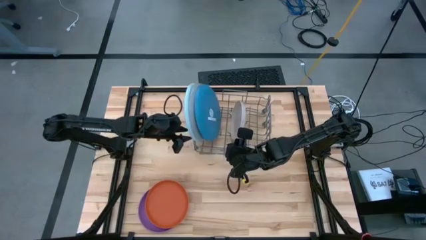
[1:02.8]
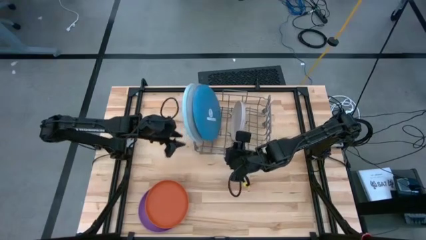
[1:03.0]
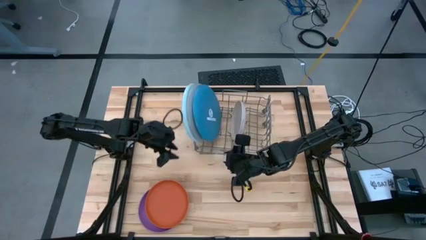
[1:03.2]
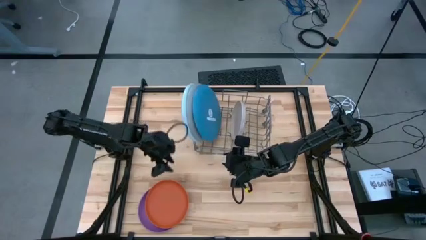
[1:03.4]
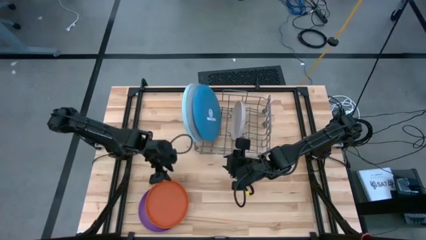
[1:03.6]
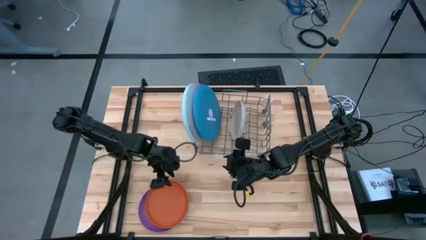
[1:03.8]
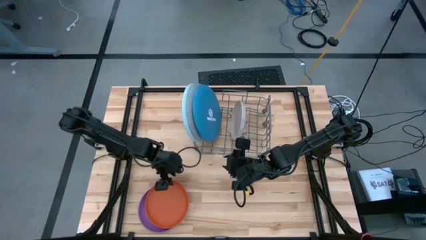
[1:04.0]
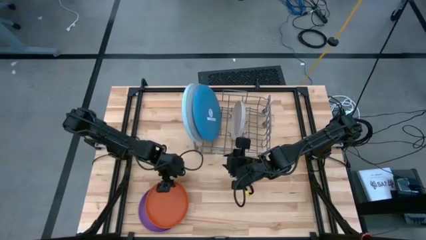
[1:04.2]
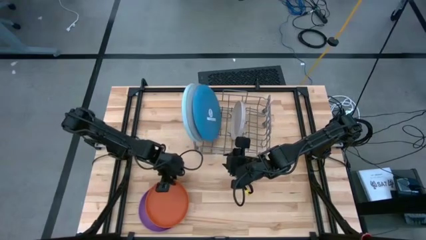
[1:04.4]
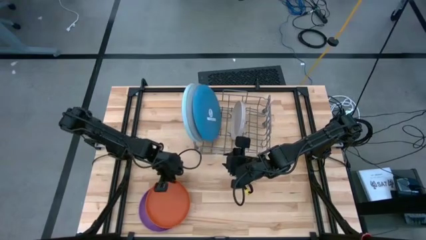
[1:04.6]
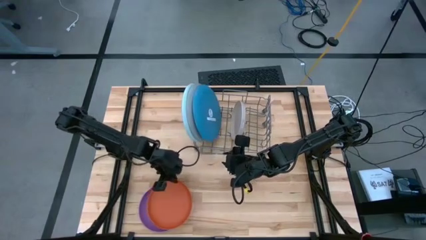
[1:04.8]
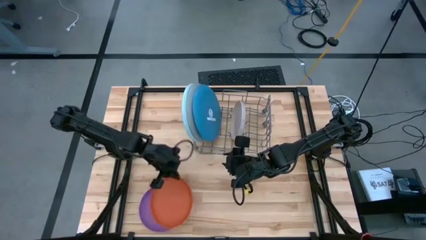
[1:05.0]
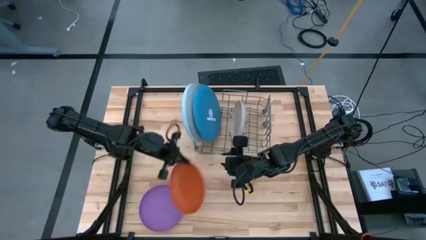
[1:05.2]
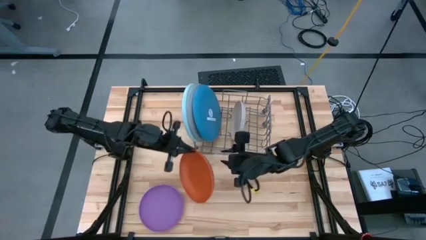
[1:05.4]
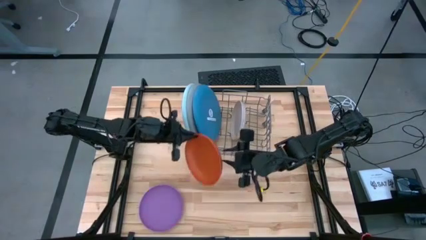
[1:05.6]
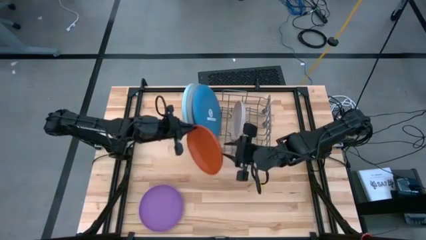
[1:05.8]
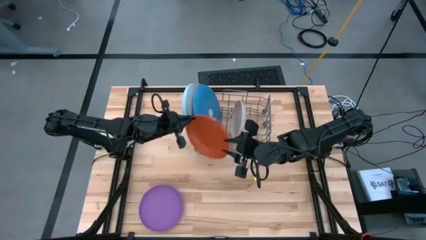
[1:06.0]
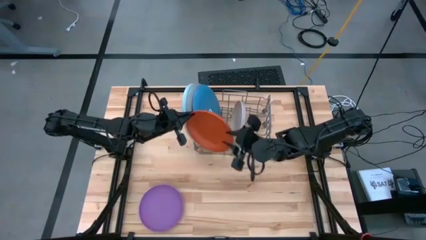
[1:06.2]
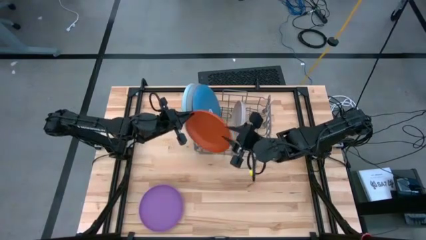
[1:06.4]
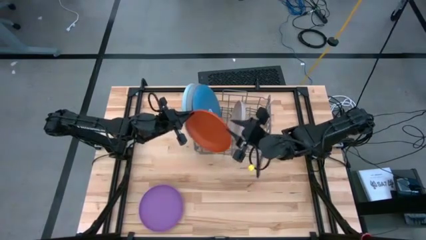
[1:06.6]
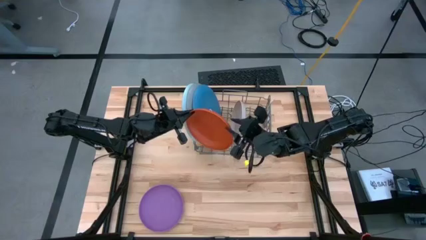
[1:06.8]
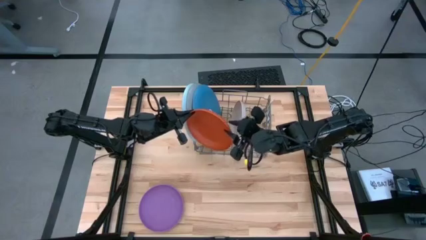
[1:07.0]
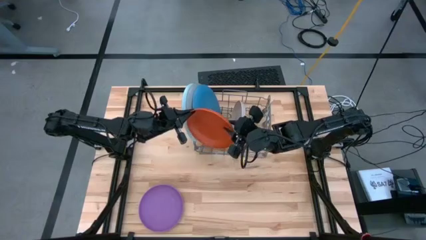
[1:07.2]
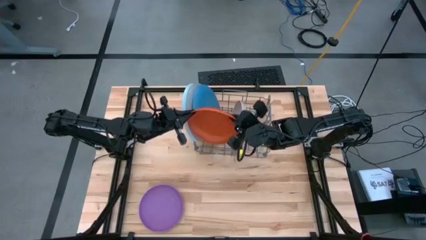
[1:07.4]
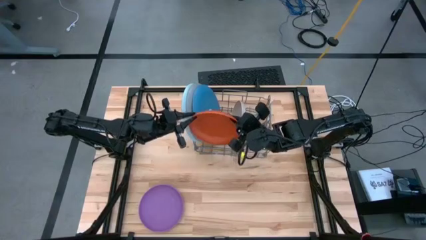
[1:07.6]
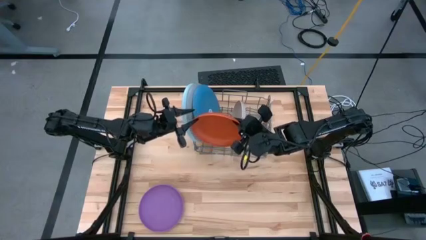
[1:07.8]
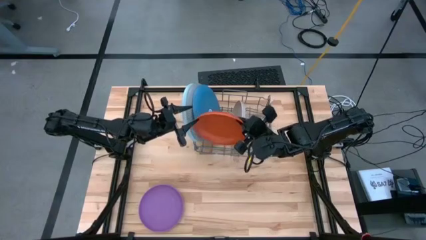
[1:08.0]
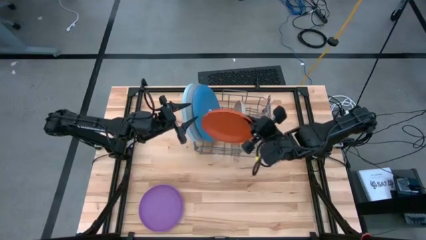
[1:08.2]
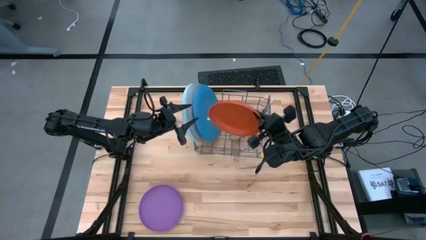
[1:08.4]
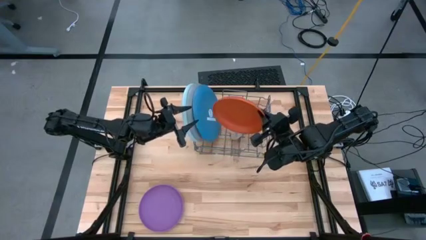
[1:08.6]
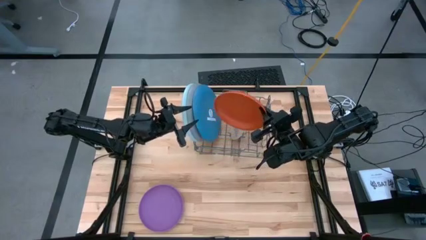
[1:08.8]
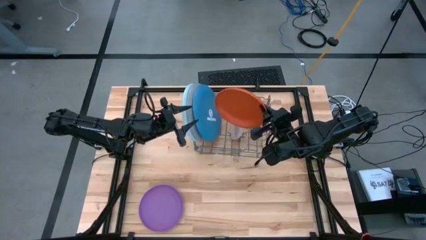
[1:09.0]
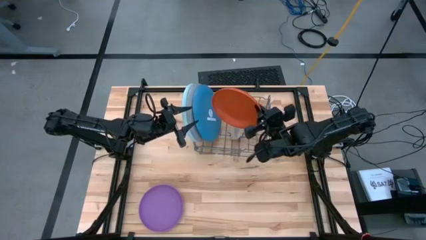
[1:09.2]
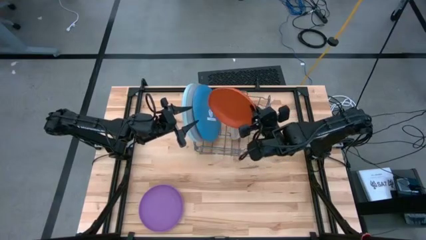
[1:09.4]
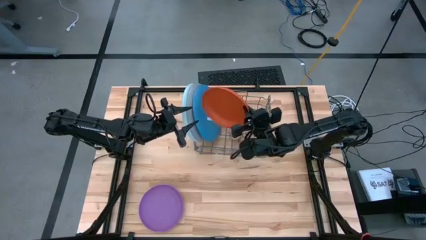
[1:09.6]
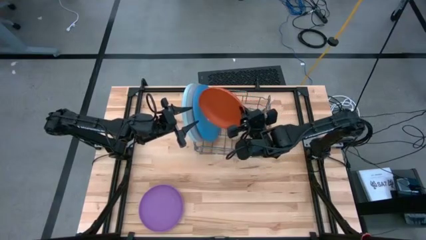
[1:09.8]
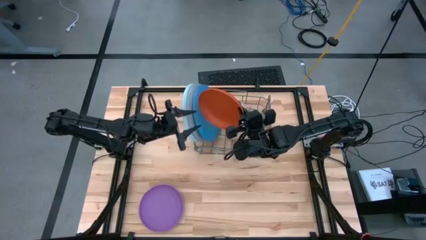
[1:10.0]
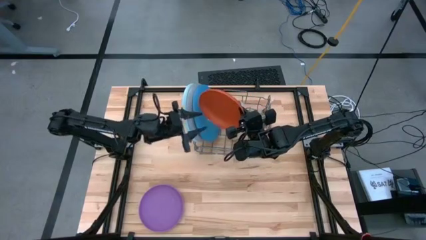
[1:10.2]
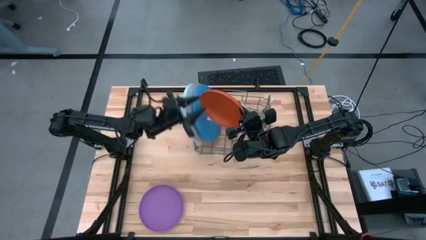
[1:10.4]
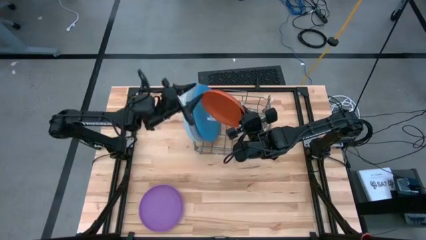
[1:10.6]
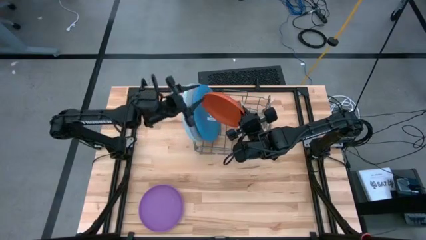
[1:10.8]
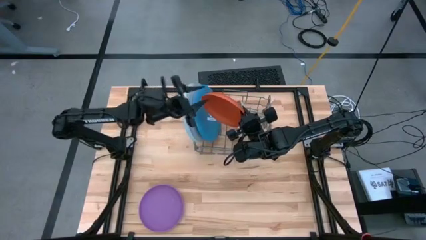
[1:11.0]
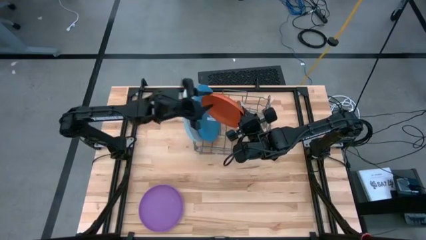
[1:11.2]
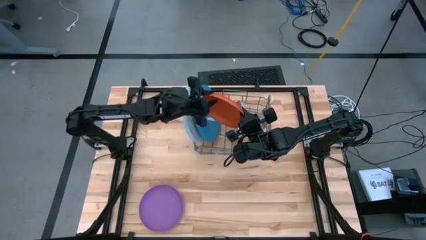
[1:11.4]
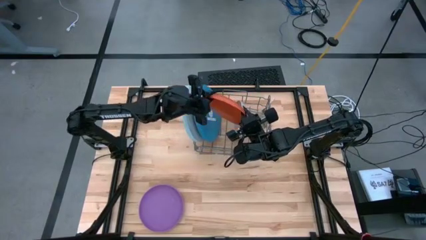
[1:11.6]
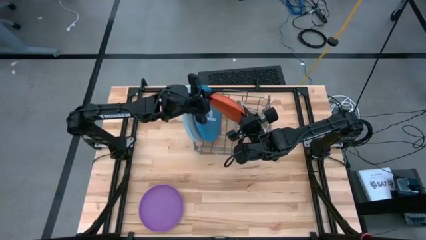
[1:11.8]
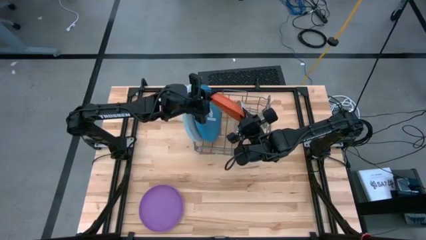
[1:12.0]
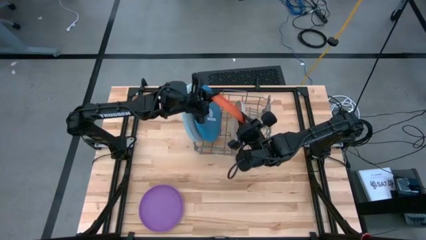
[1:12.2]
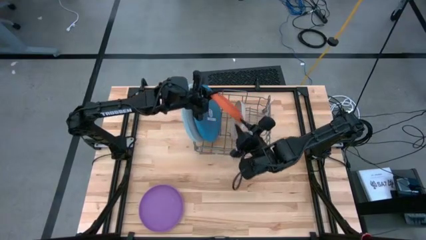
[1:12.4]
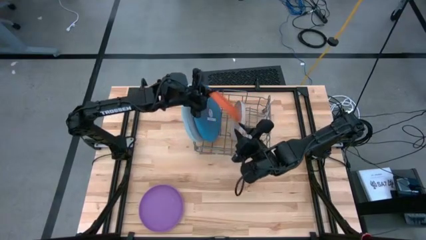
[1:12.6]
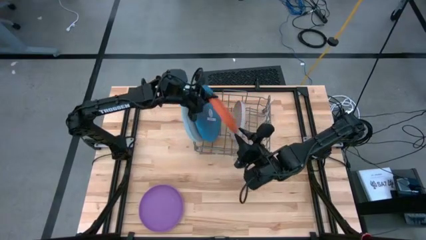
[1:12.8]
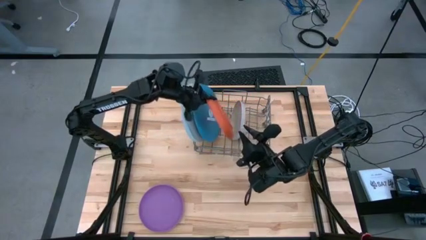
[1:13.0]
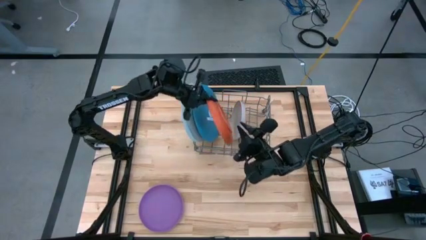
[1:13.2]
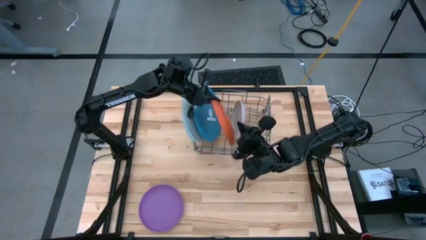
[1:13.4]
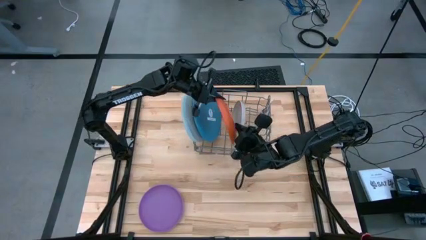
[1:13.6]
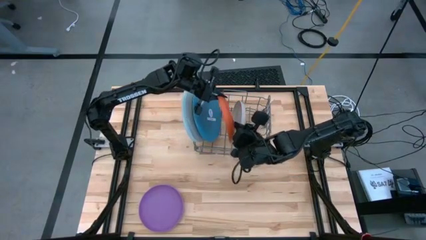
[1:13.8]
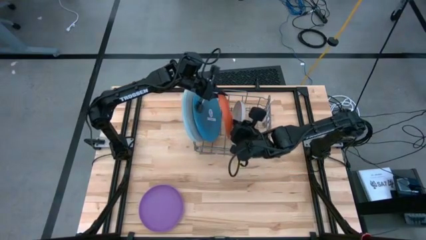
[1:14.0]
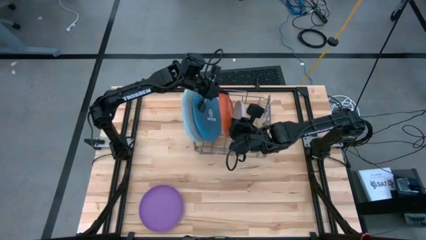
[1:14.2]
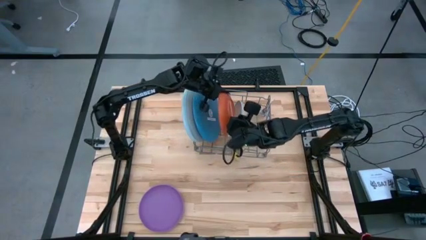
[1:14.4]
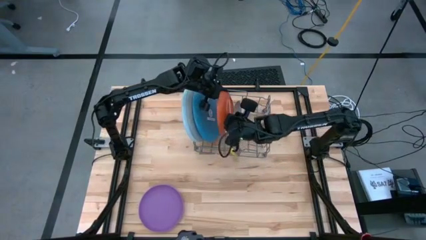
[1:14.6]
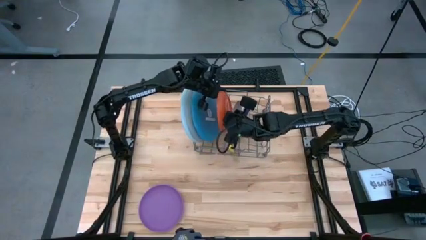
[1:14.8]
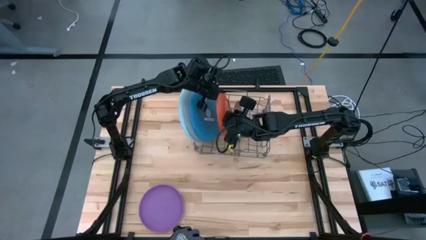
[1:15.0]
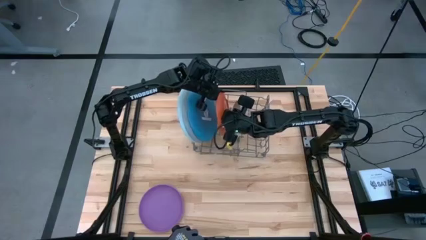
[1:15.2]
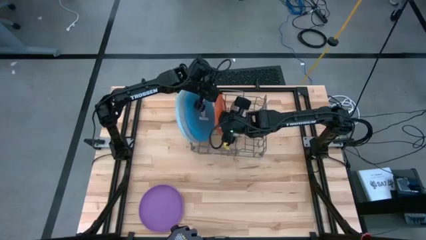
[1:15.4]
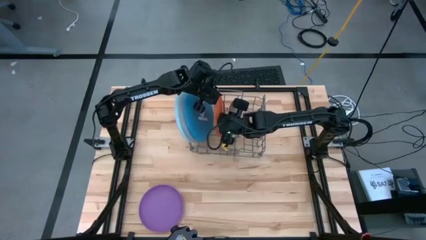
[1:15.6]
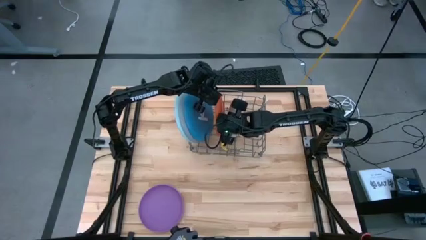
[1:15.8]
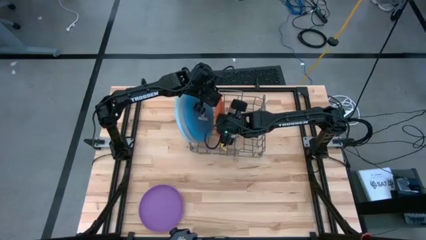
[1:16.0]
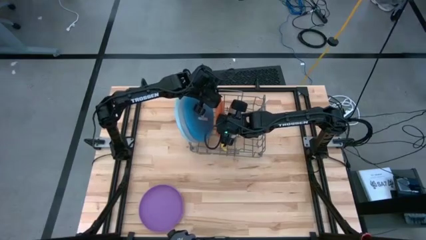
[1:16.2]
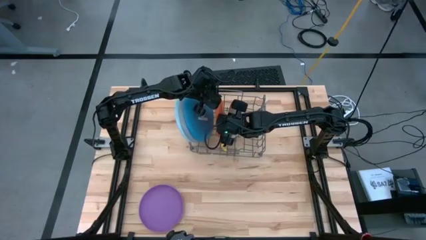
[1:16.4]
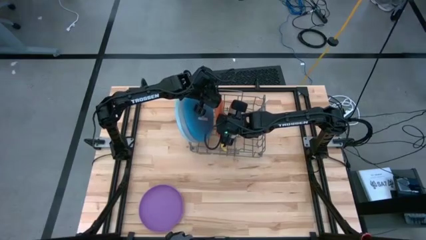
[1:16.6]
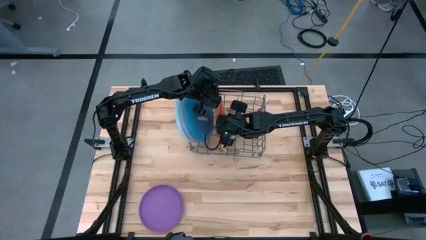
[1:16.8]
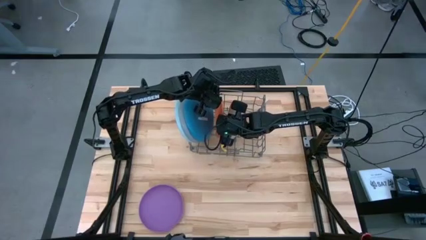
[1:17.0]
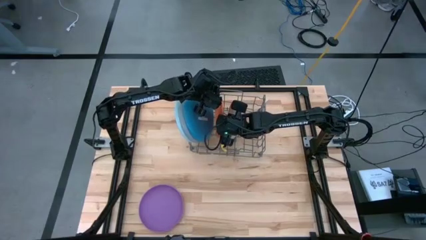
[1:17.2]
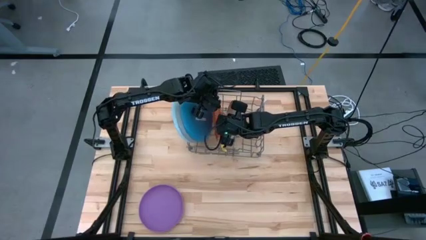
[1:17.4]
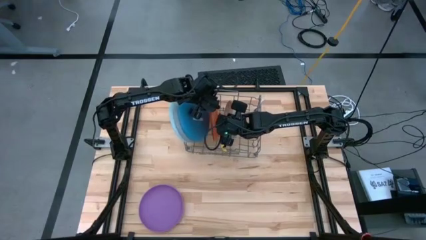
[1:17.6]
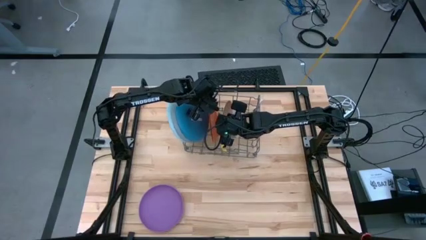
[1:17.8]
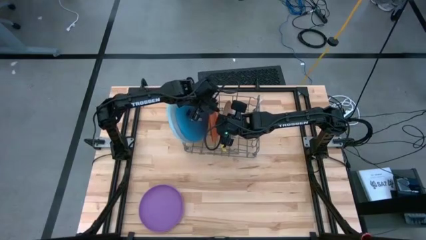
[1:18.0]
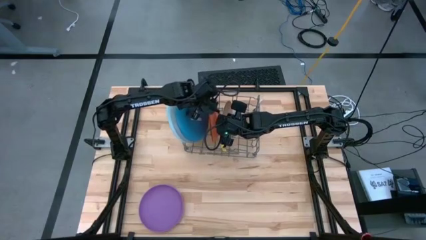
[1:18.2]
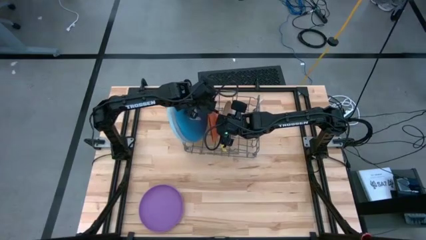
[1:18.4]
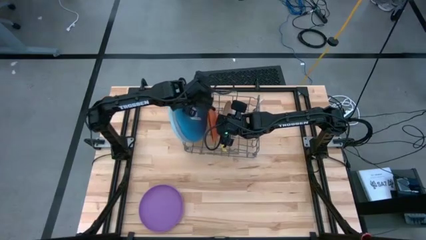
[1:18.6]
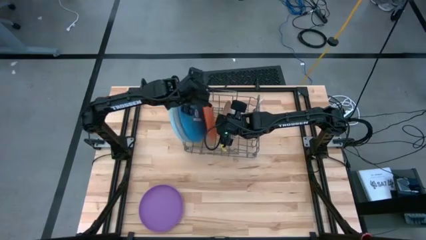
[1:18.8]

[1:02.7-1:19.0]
Task: Sort dishes
Put the orange plate into the dish rack
